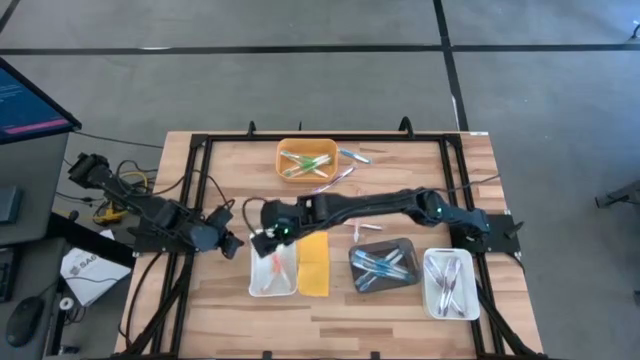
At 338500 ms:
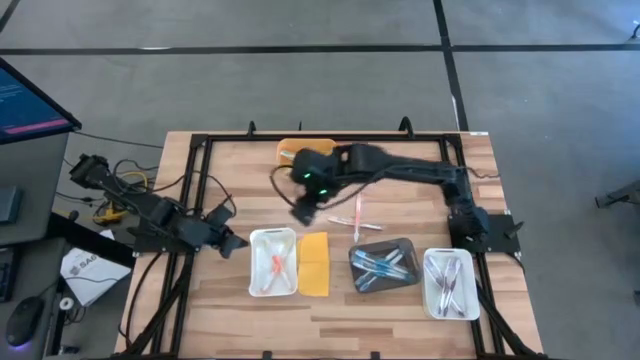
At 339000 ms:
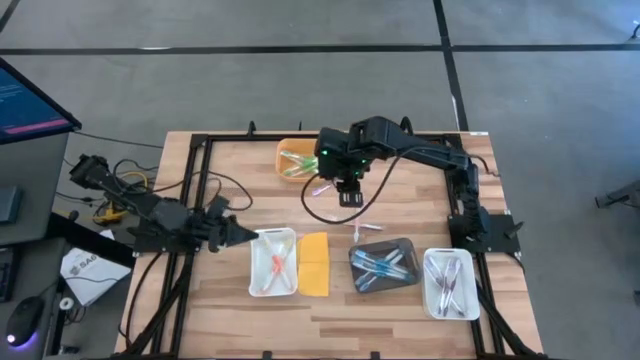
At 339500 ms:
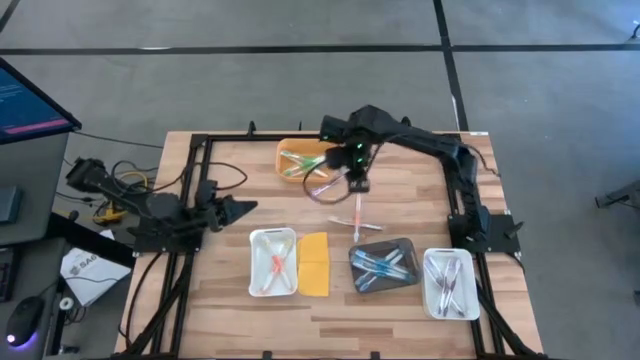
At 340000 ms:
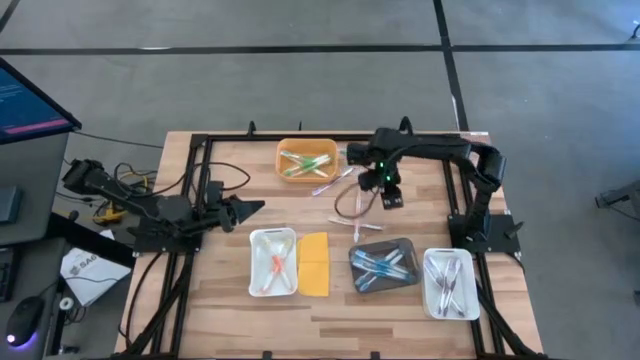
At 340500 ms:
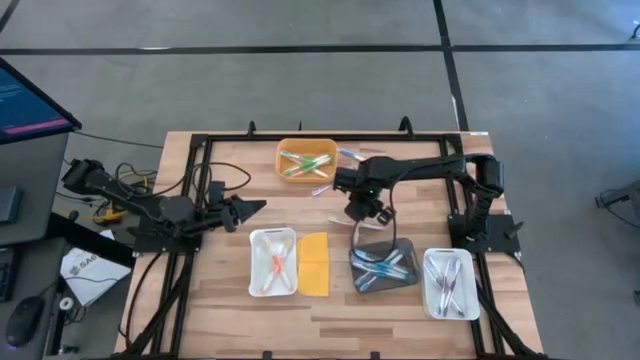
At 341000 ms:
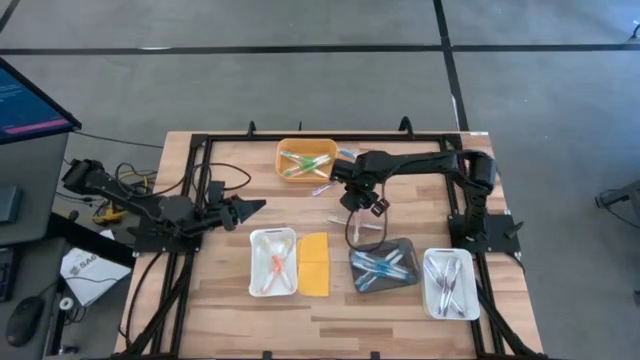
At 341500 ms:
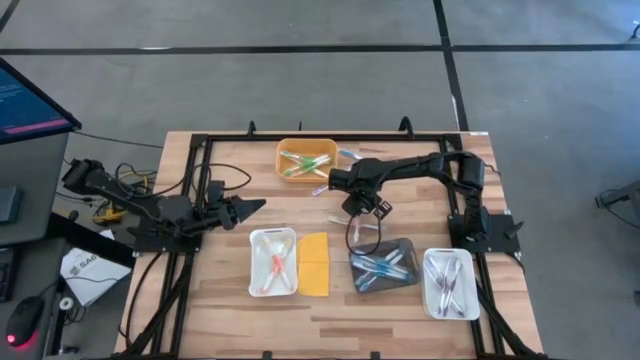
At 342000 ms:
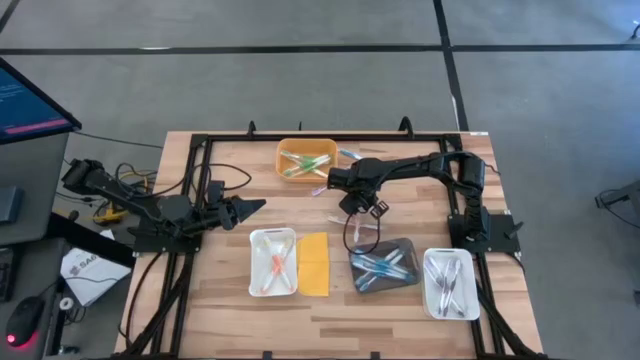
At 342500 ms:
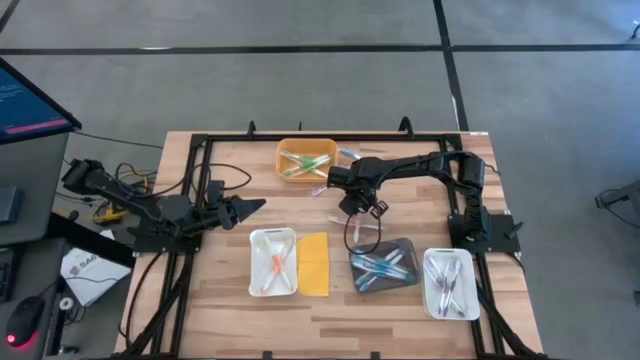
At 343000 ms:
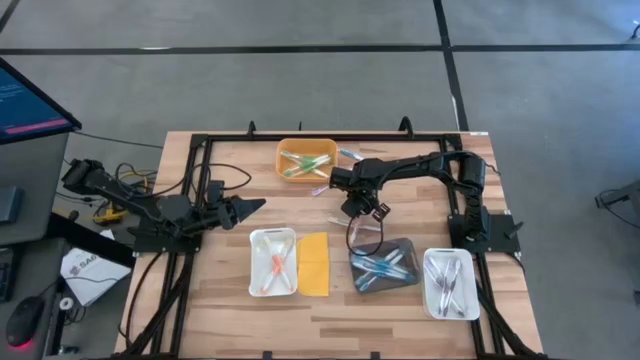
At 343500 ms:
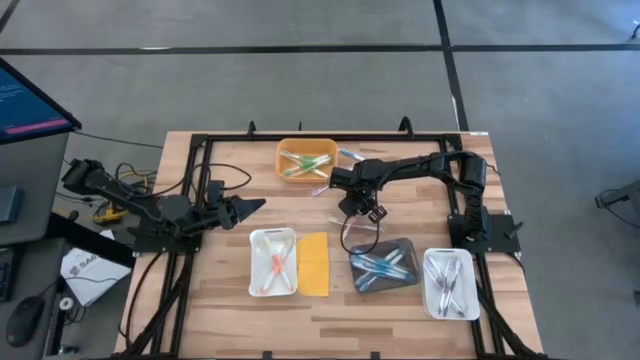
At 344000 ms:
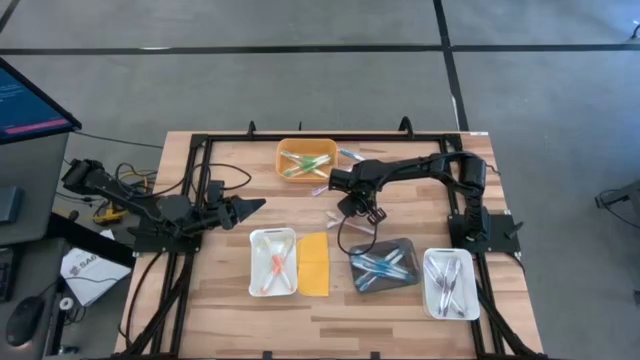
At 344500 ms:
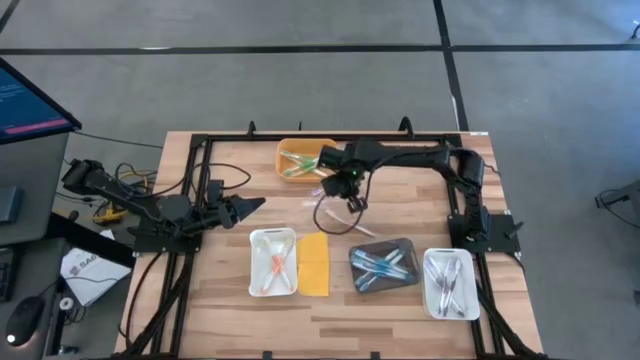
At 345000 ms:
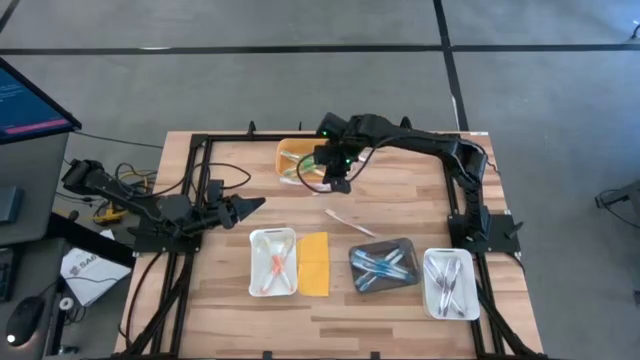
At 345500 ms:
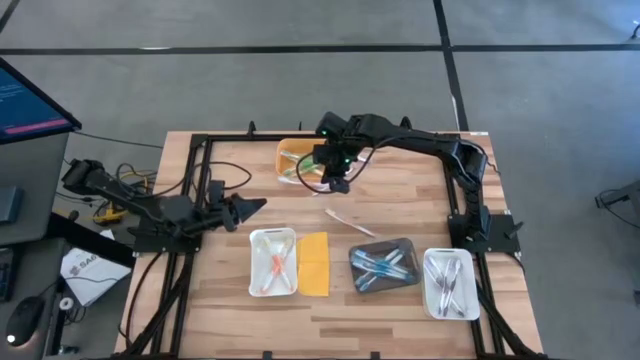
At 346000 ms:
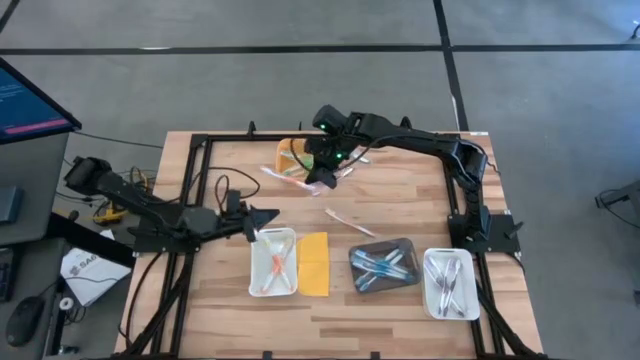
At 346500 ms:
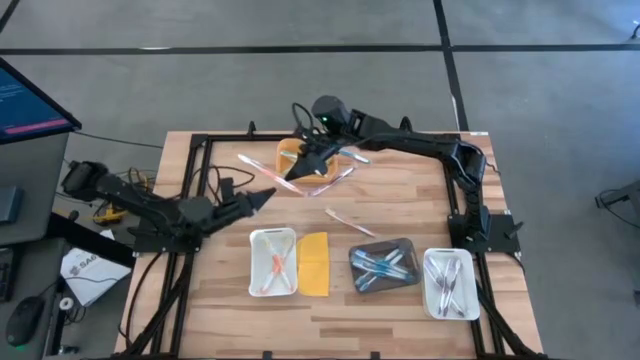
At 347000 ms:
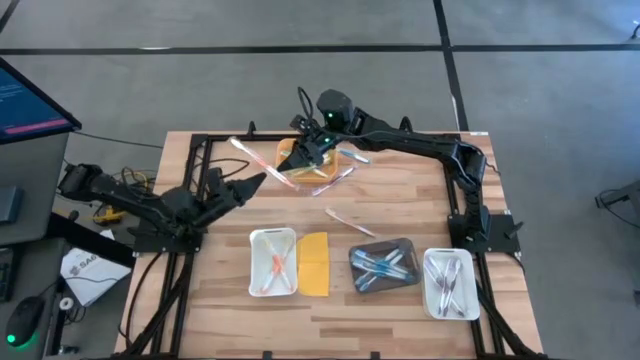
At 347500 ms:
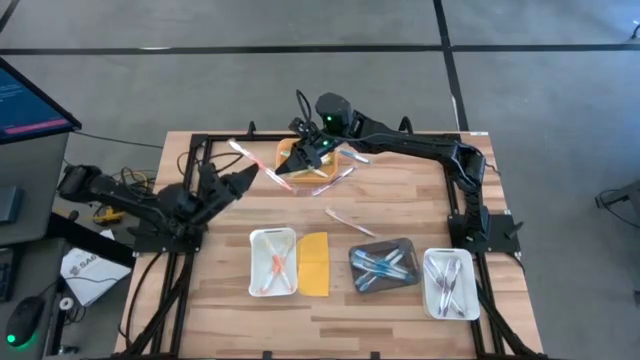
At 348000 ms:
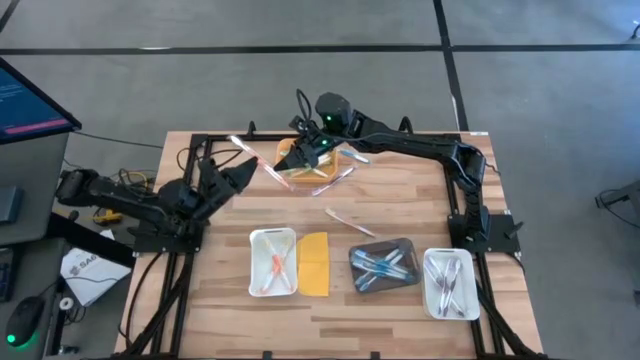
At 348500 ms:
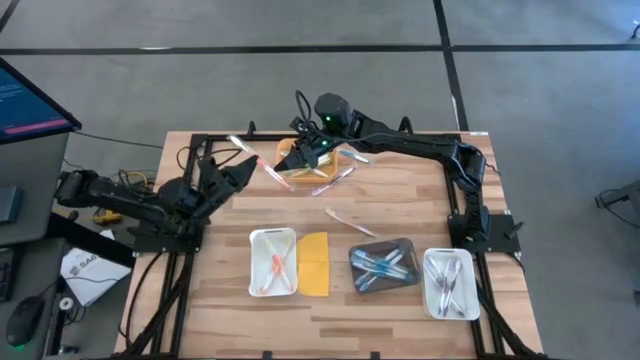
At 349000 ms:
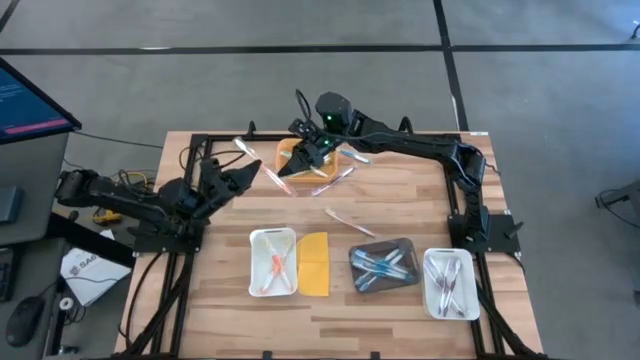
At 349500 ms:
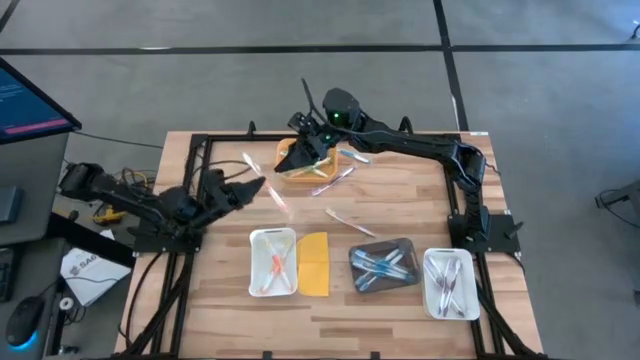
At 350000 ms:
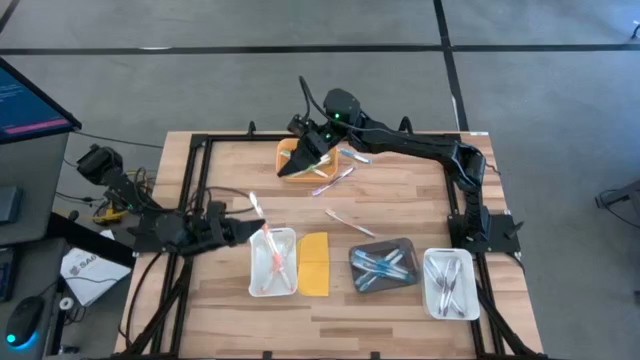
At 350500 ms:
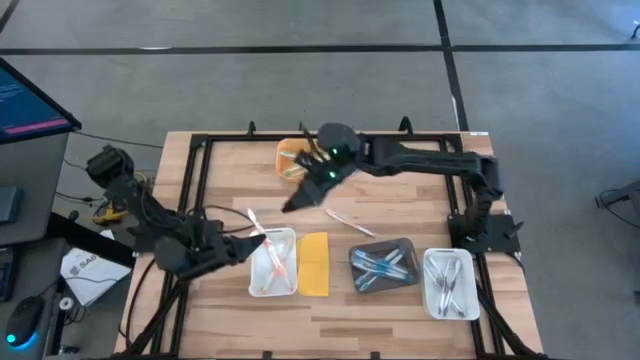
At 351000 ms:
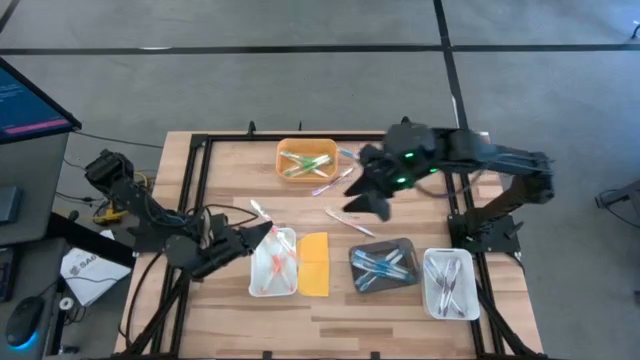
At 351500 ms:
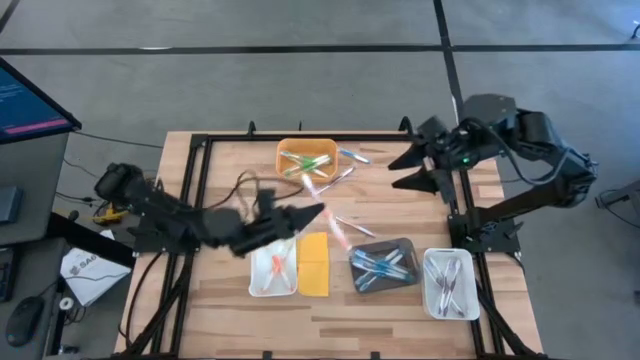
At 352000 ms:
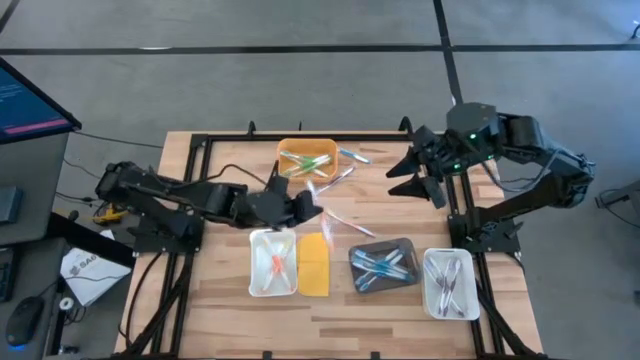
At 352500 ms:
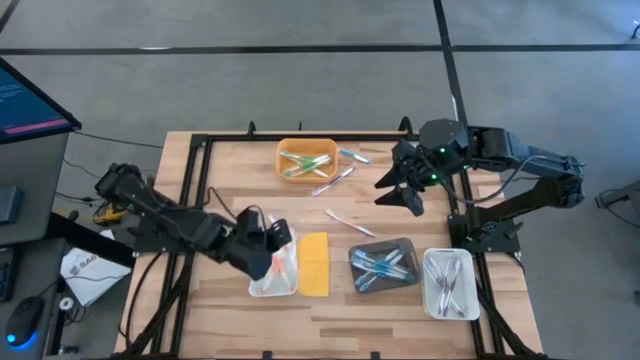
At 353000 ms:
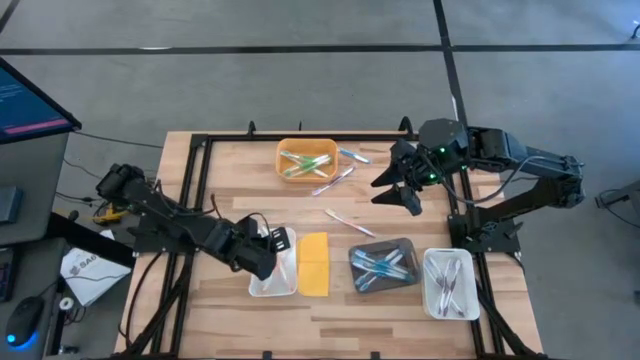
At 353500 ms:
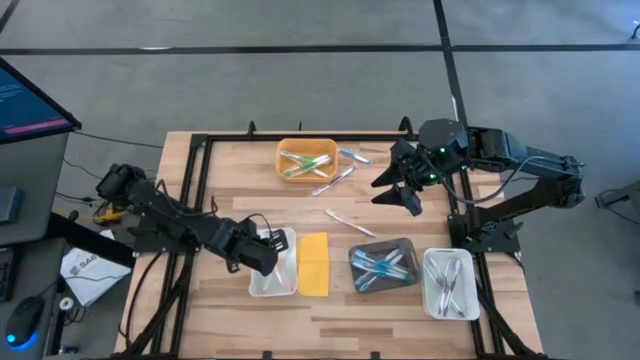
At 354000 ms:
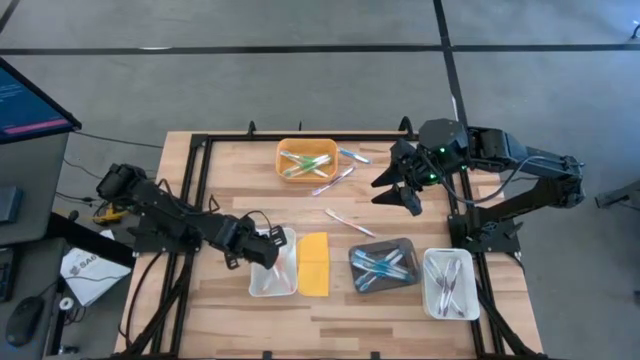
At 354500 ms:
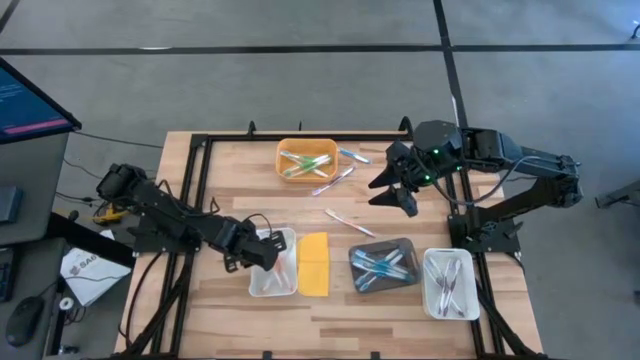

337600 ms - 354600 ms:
Task: Pick & Place Toothbrushes
Put the orange toothbrush into the left white bin

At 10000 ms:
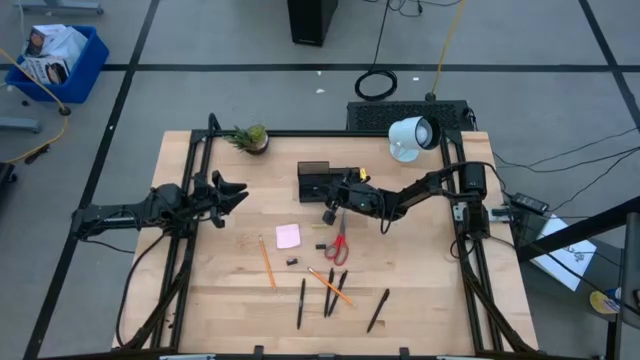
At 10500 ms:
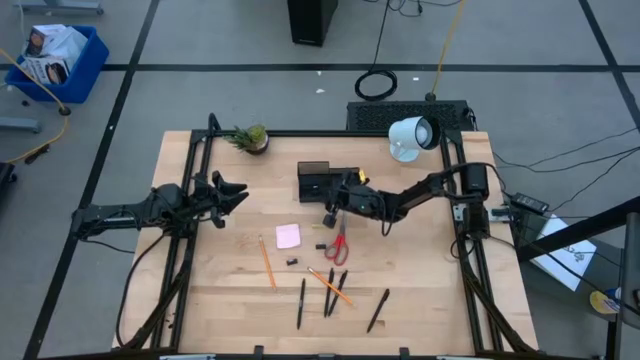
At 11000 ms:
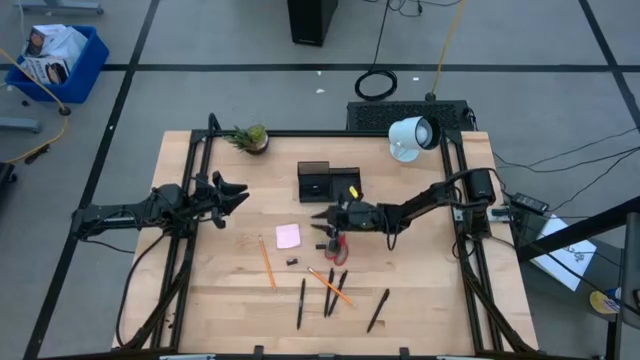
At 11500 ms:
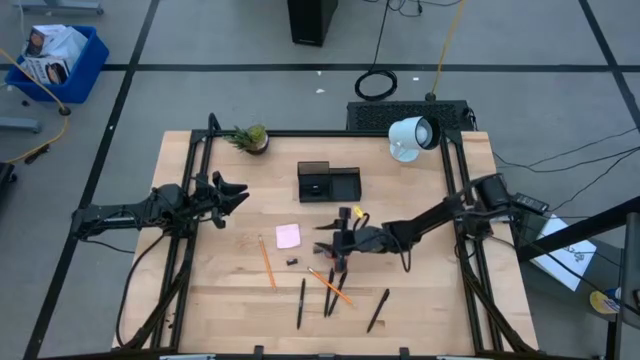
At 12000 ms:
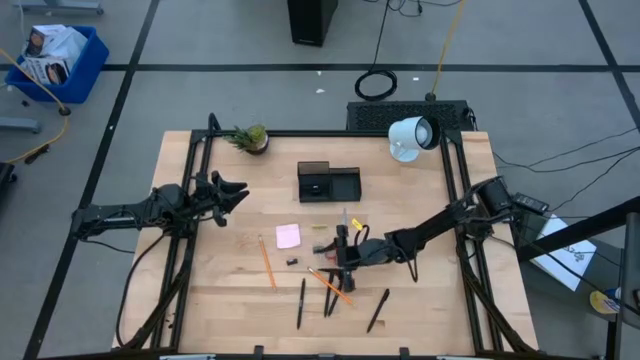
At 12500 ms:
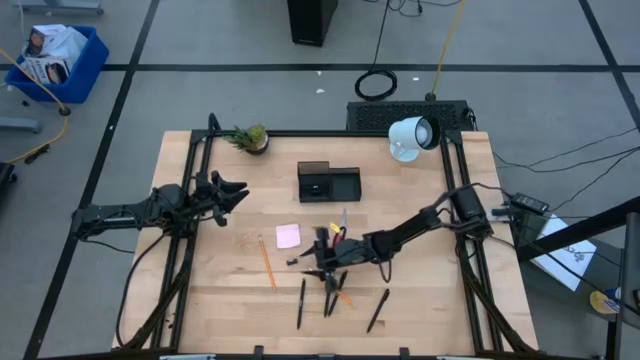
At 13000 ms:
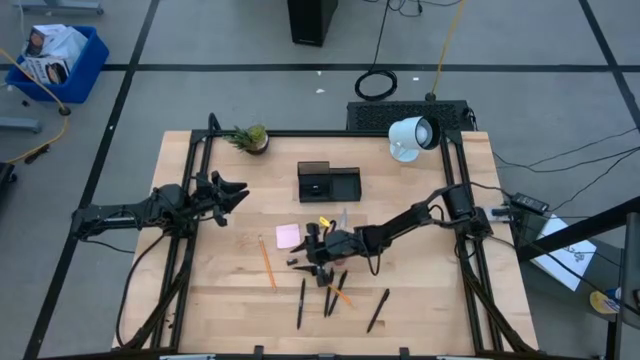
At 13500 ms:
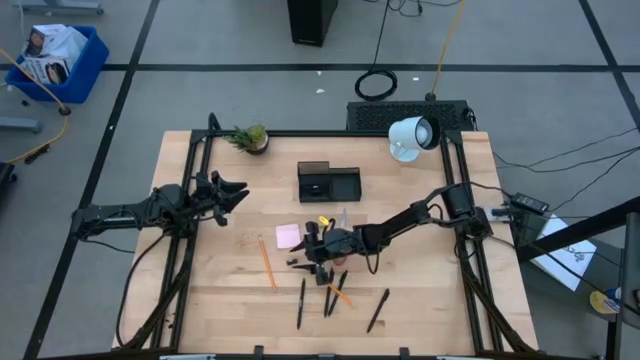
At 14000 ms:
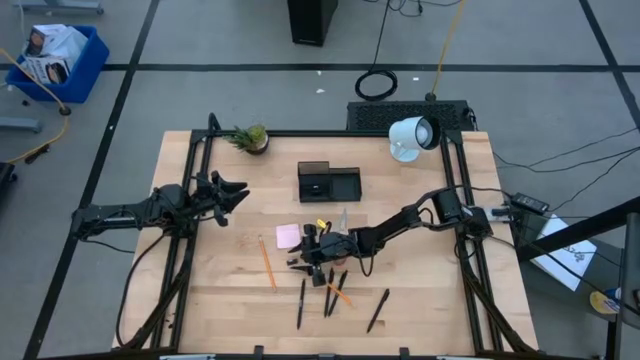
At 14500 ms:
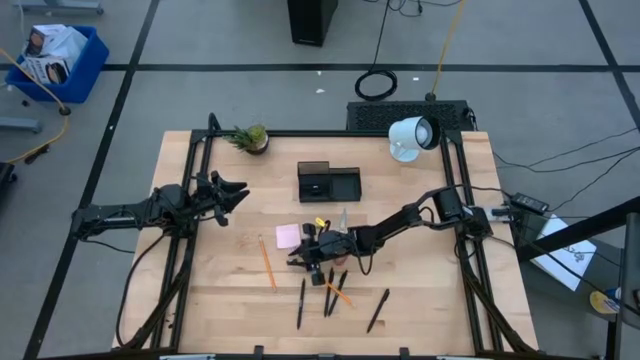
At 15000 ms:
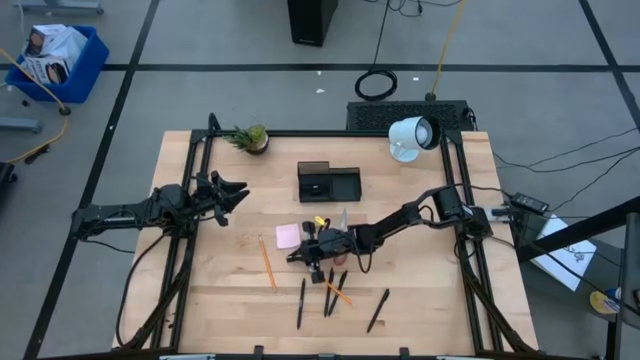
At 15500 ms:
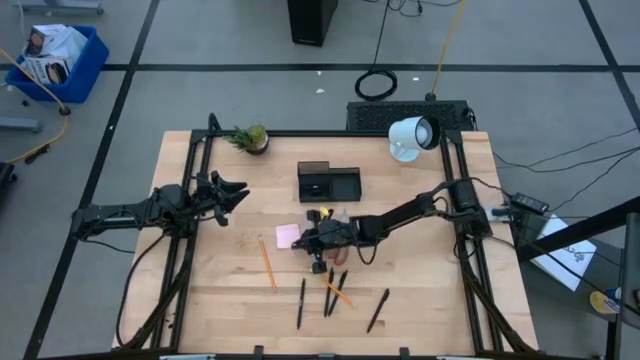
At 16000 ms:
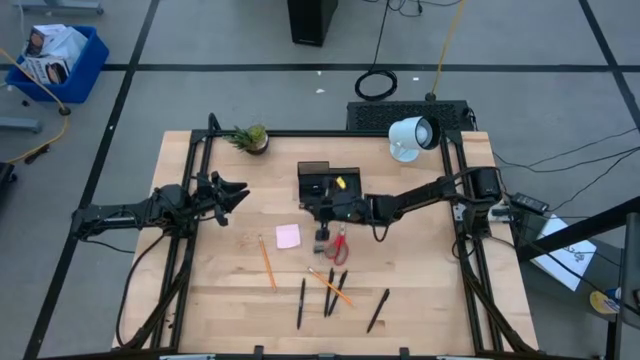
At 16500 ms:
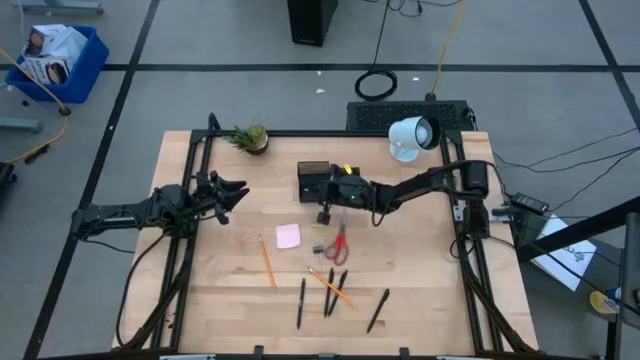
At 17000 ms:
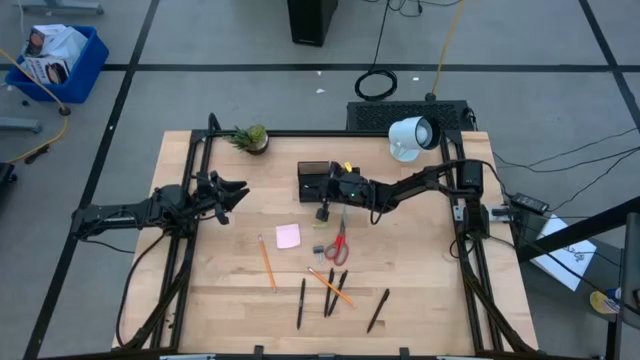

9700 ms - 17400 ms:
Task: Pick and place office supplies into organizer
Put the left binder clip into the mesh organizer
